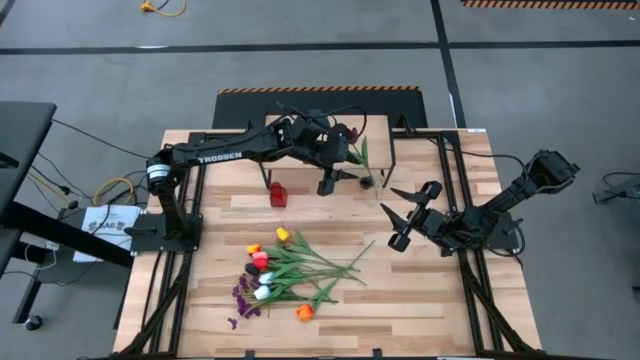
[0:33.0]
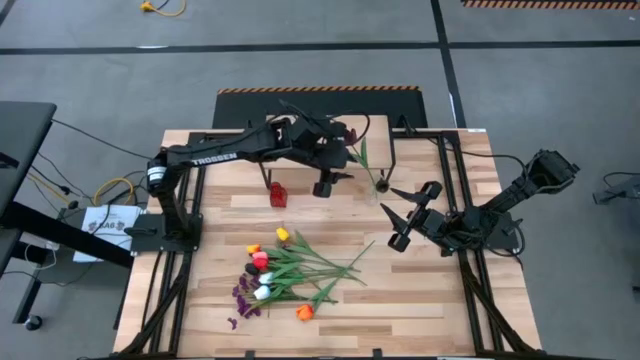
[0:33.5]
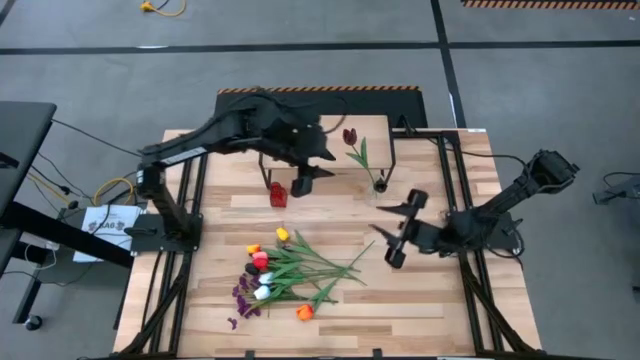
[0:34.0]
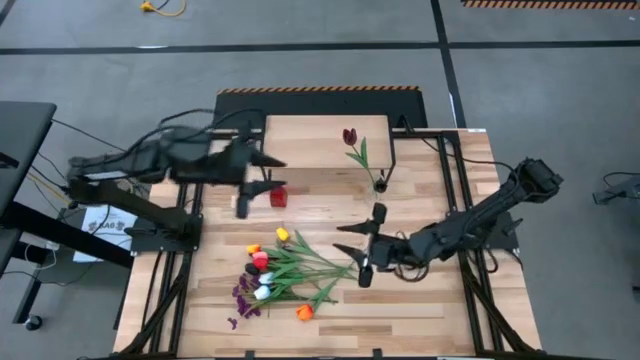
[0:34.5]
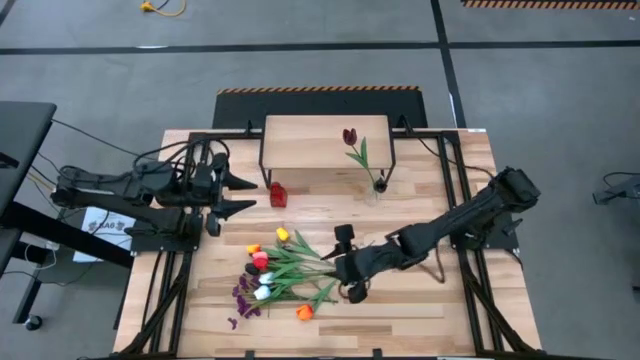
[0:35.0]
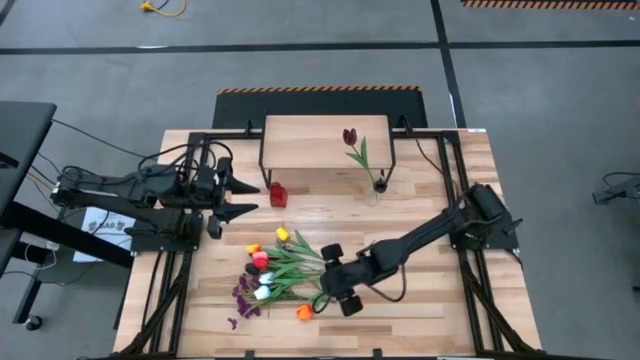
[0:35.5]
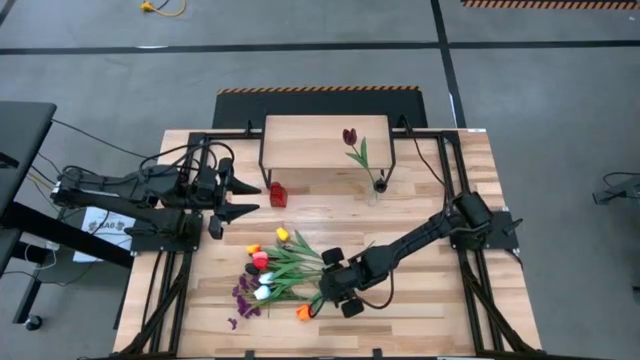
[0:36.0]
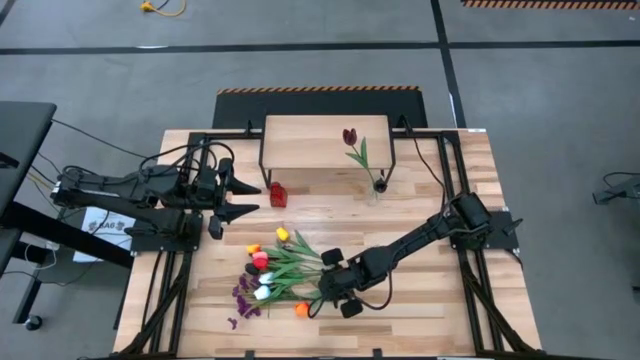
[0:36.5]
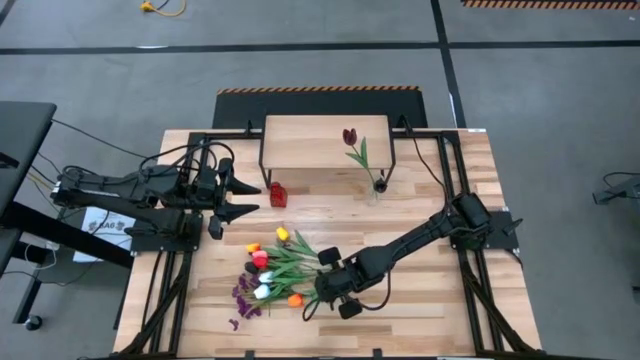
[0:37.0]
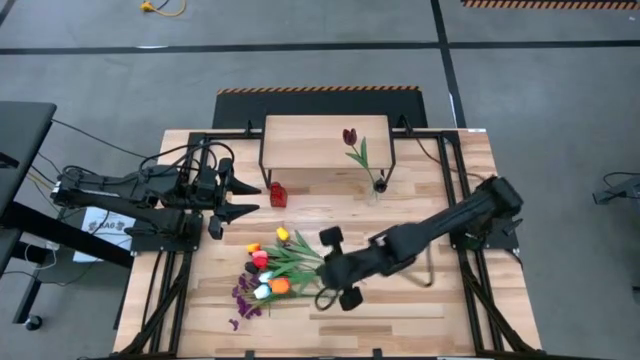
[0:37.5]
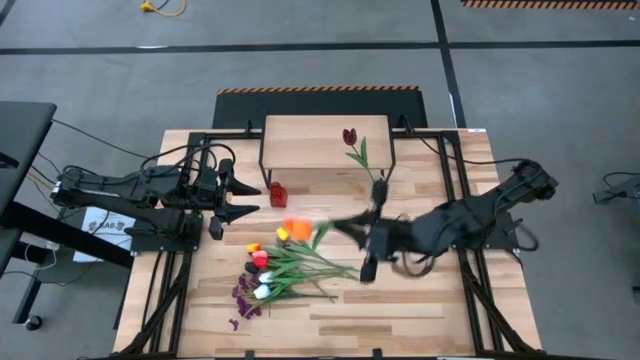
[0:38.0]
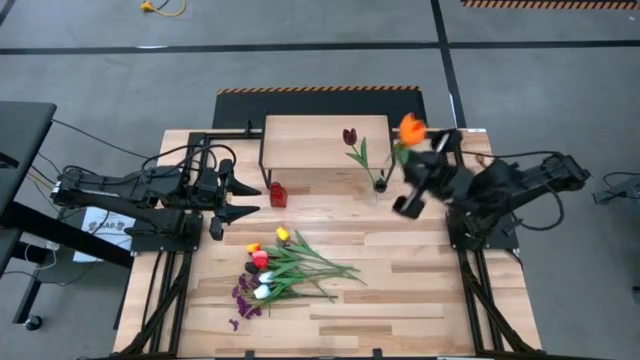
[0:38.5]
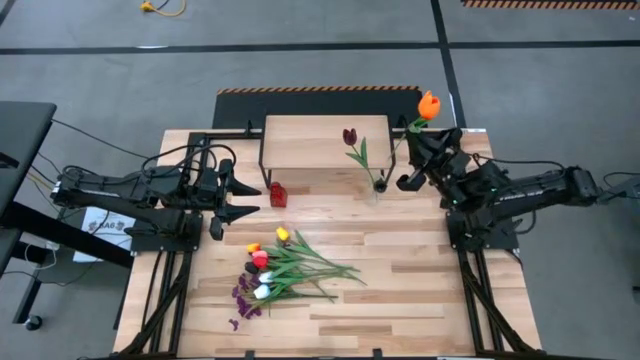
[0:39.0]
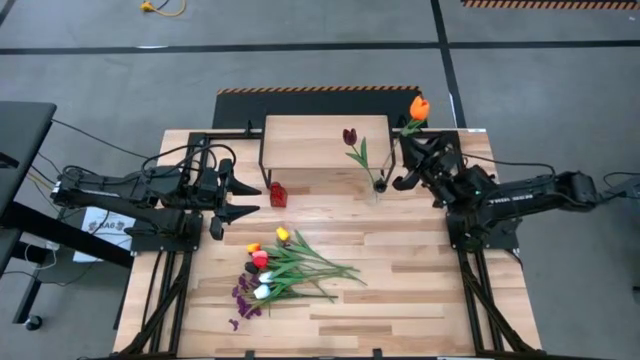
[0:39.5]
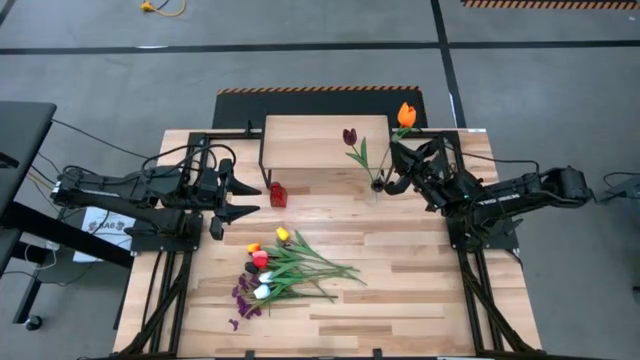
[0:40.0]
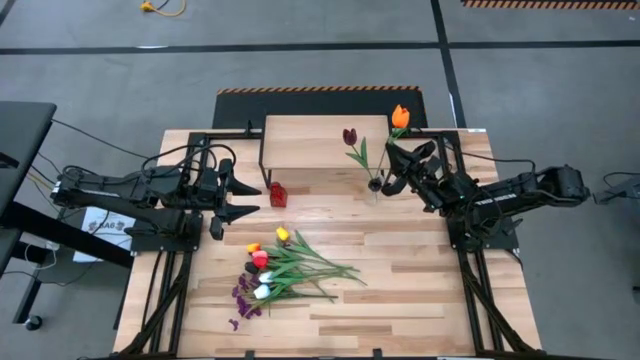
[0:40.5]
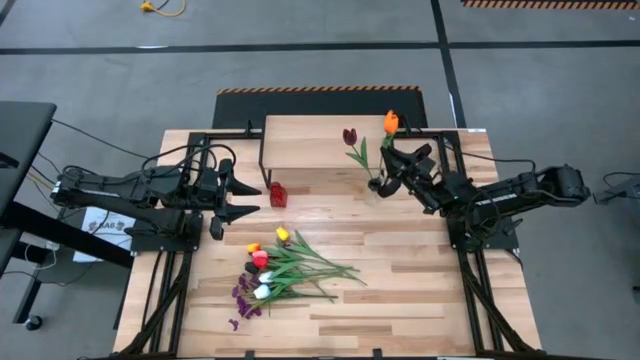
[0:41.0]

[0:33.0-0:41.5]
Task: Pick and place flowers into a vace then onto a shelf
Put the orange flower into the transparent vase

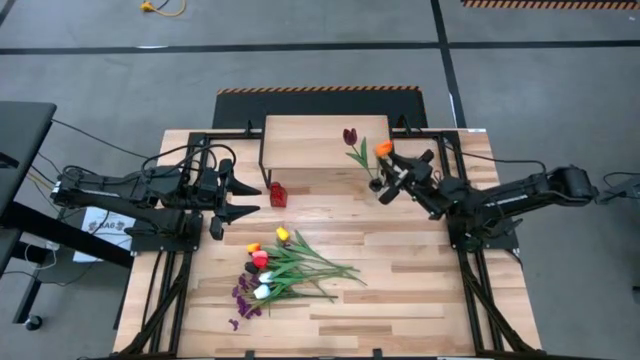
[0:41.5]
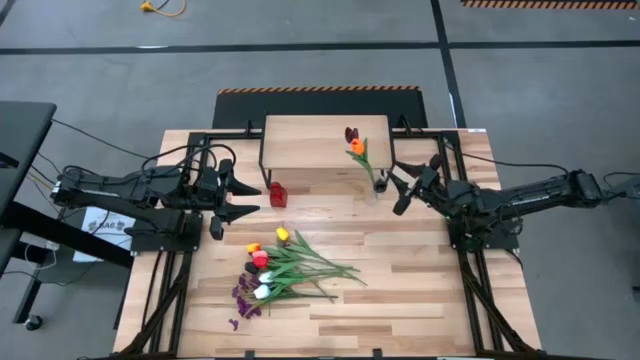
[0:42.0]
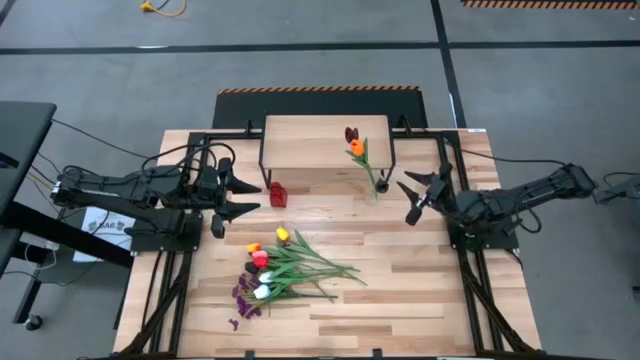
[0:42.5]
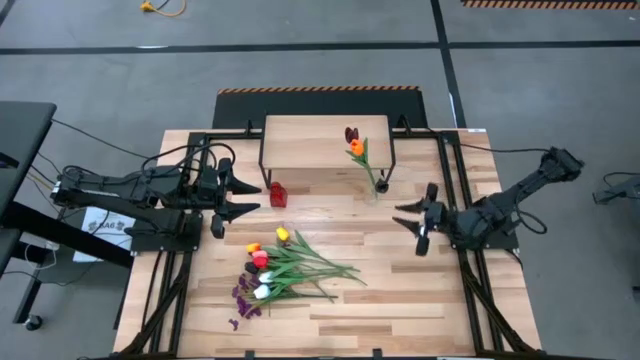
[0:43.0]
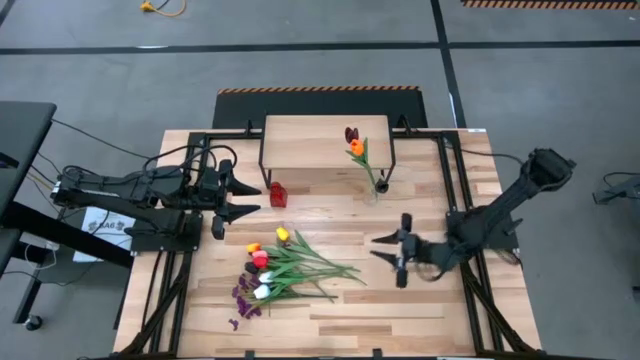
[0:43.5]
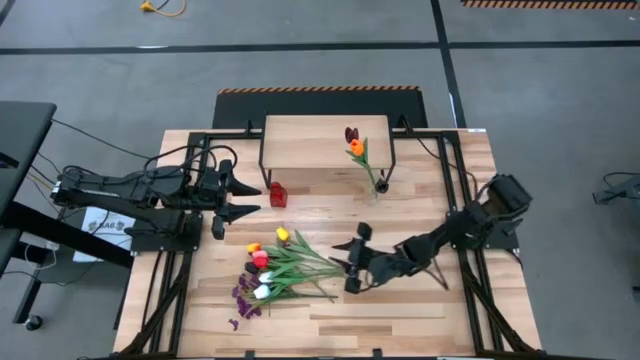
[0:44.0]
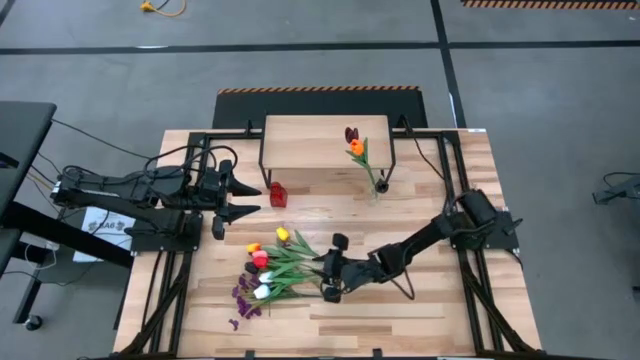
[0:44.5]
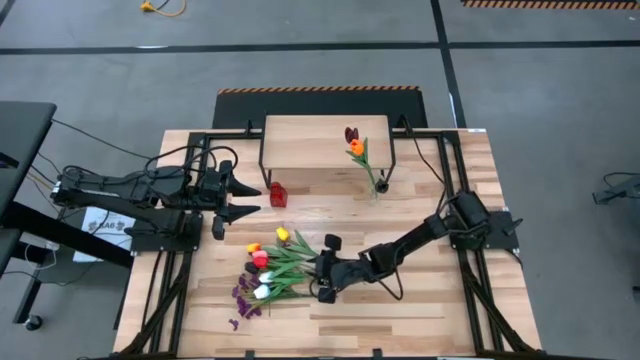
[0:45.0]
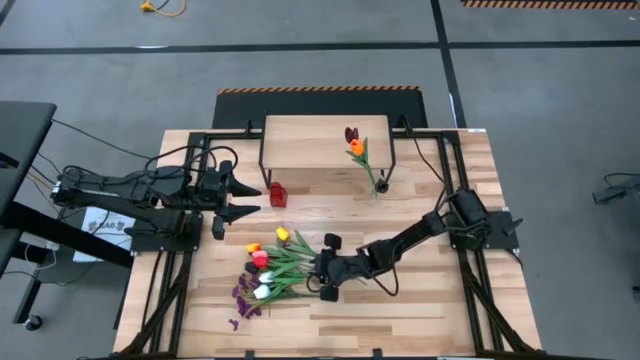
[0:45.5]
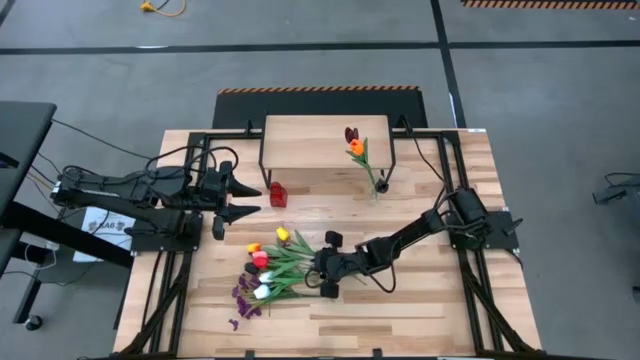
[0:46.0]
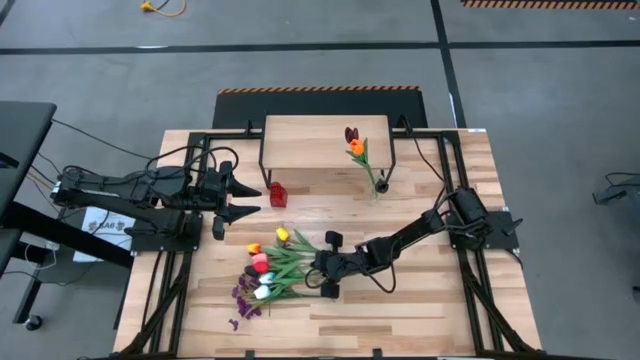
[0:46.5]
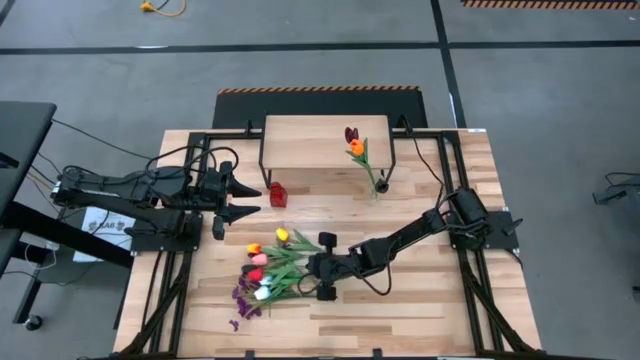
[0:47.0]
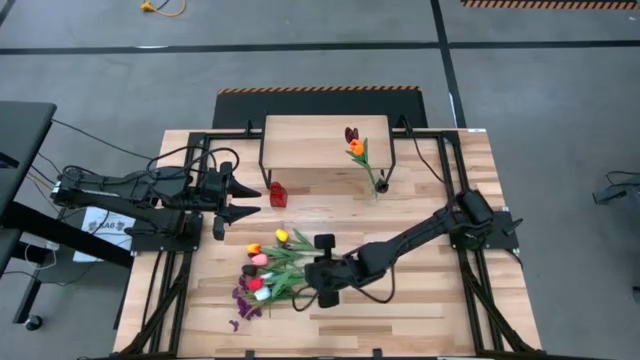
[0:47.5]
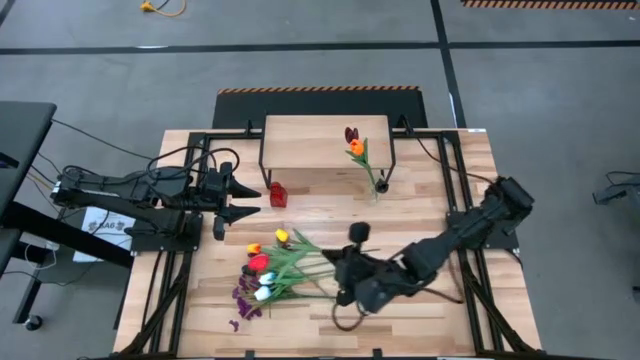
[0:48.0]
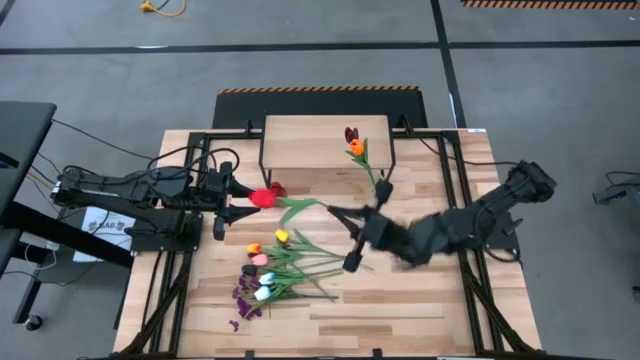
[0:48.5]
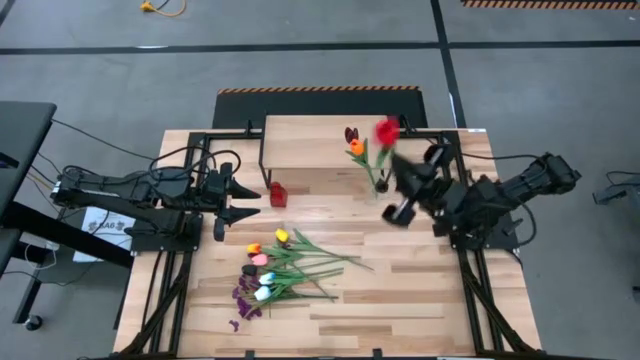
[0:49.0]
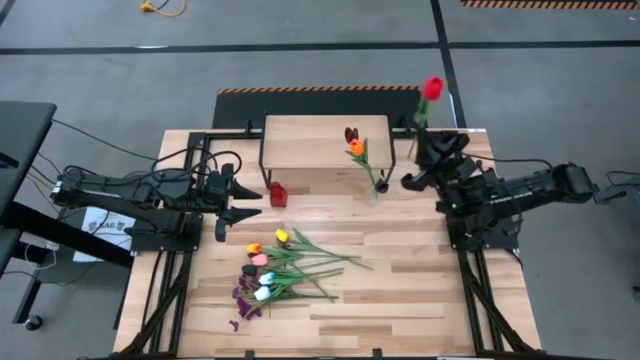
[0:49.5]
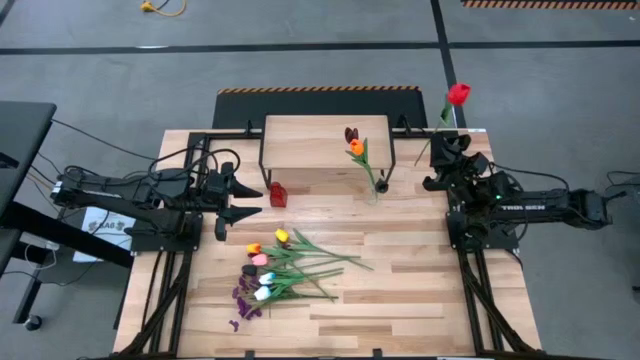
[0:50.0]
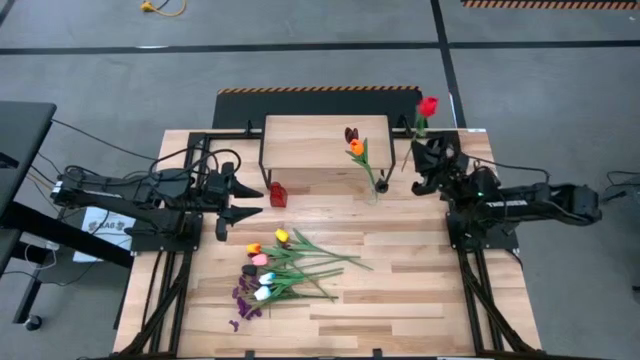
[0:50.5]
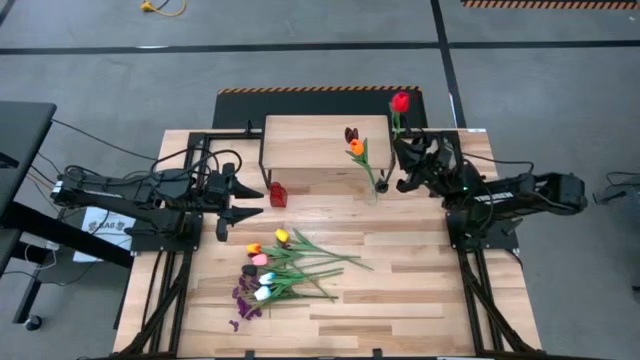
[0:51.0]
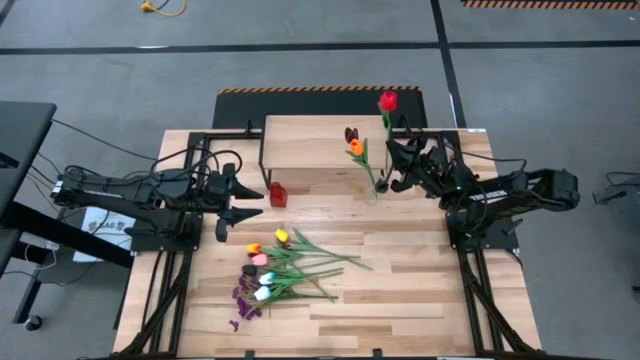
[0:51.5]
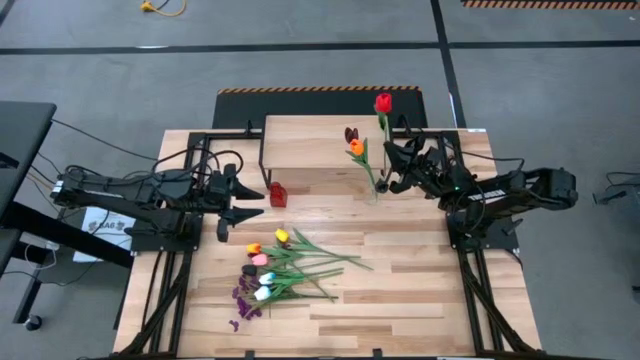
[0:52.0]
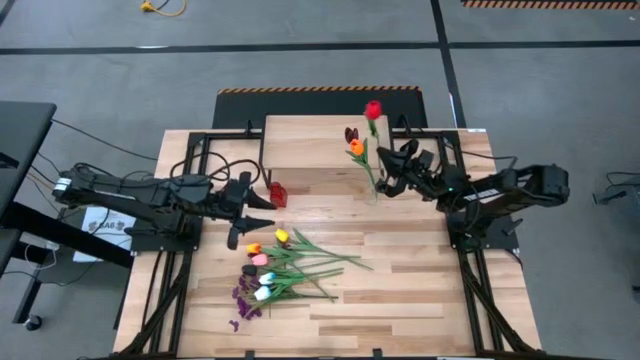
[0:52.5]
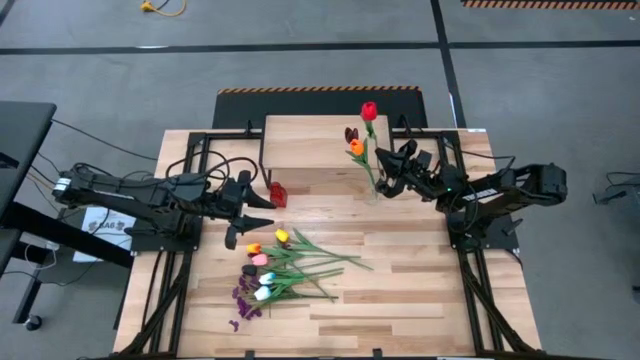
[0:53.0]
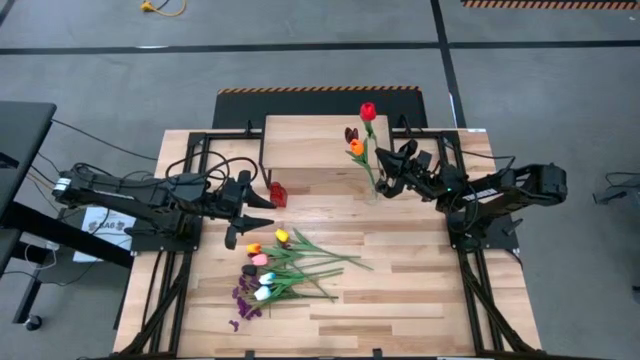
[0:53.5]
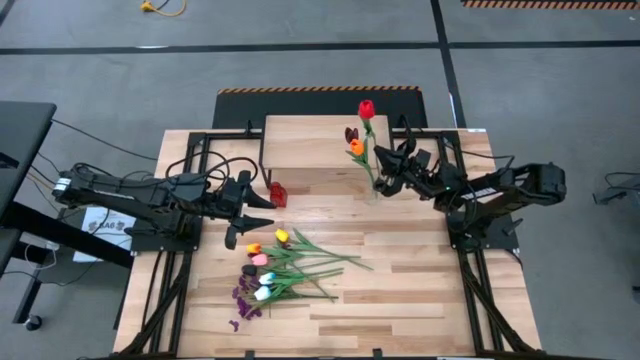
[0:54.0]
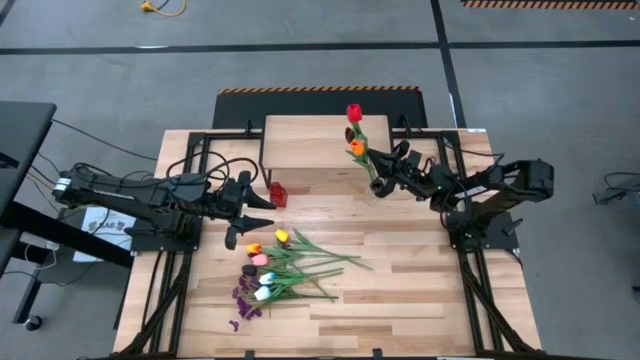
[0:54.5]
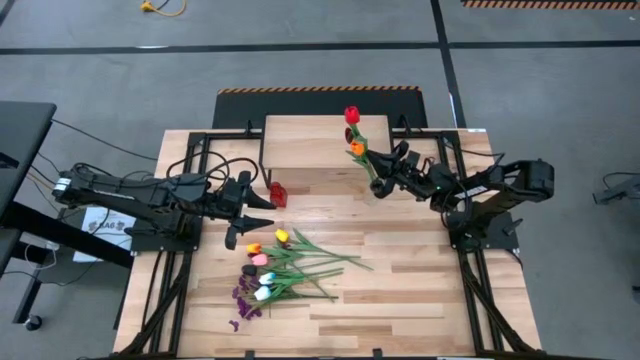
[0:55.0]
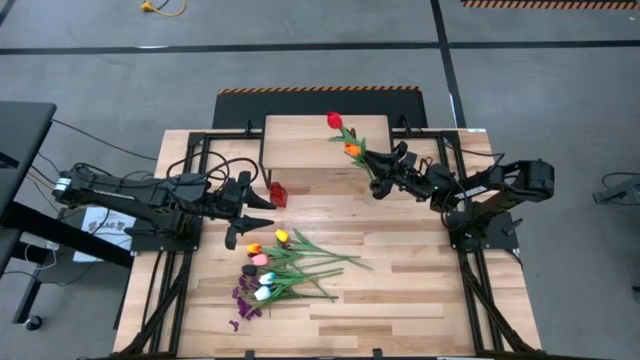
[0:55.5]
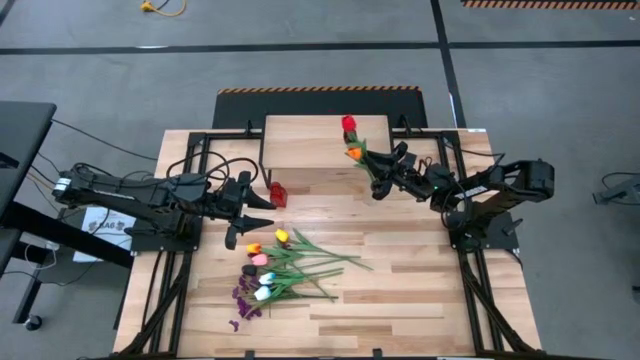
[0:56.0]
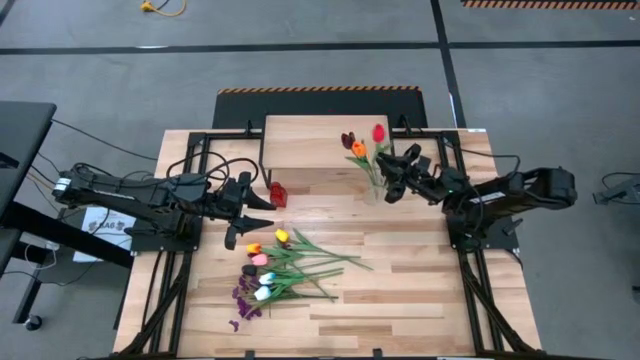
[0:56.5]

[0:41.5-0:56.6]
Put the red flower into the transparent vase
